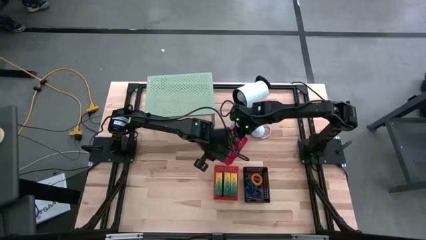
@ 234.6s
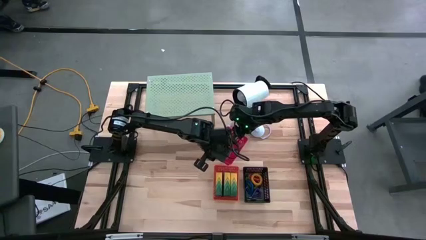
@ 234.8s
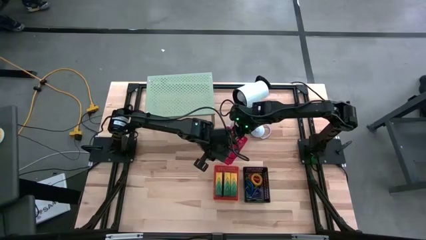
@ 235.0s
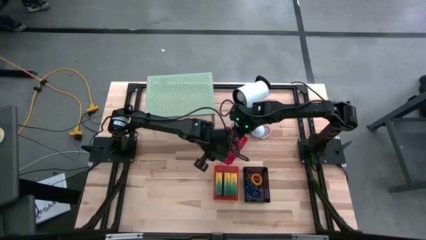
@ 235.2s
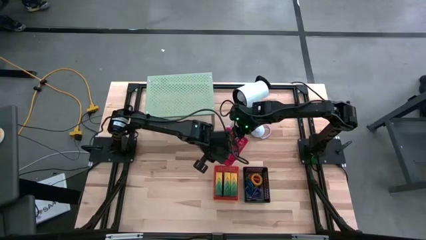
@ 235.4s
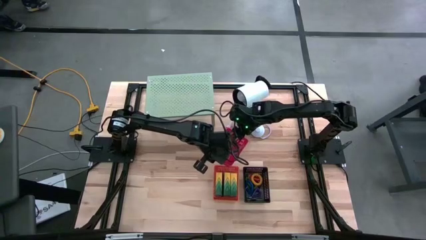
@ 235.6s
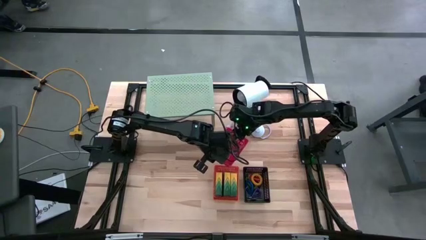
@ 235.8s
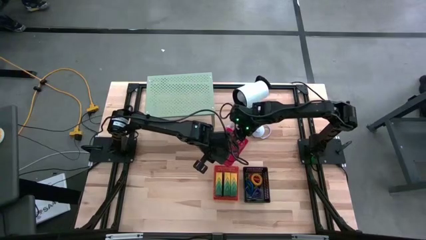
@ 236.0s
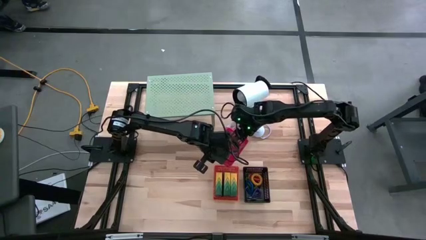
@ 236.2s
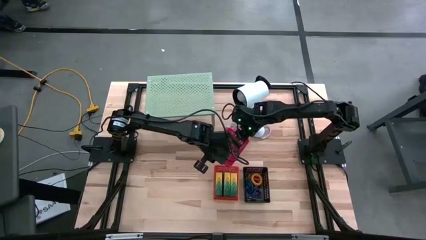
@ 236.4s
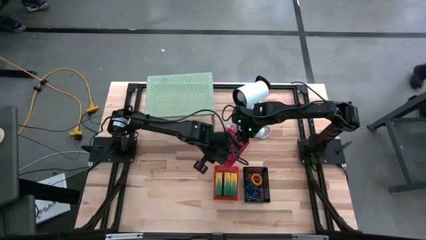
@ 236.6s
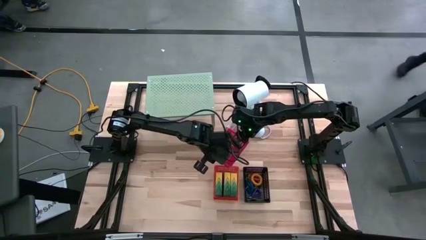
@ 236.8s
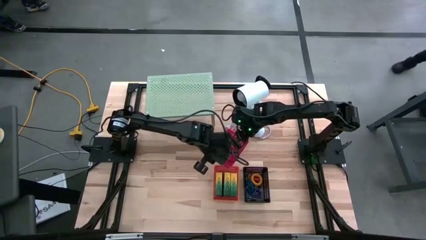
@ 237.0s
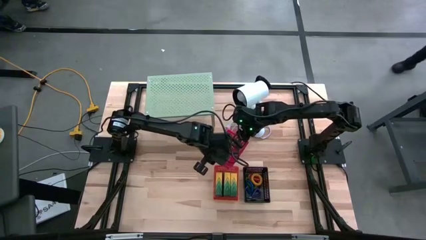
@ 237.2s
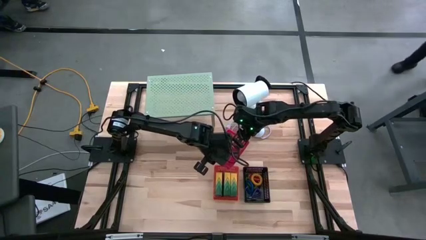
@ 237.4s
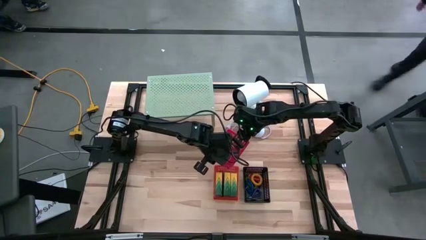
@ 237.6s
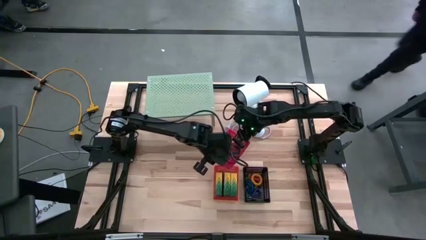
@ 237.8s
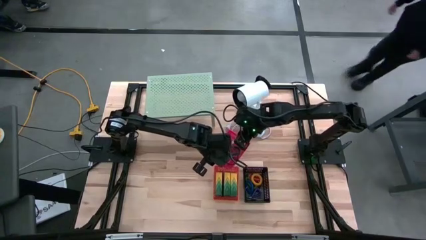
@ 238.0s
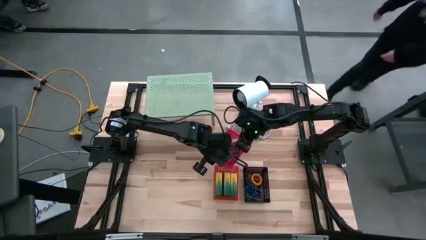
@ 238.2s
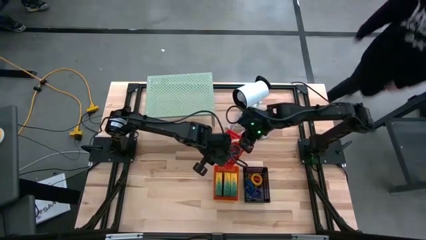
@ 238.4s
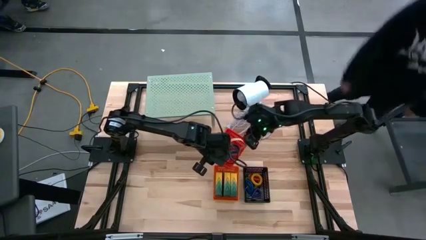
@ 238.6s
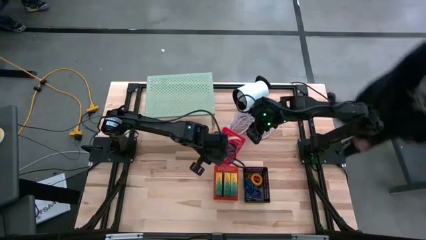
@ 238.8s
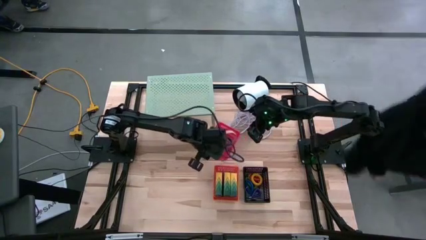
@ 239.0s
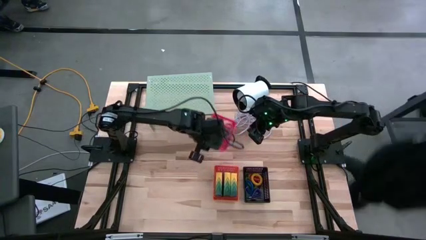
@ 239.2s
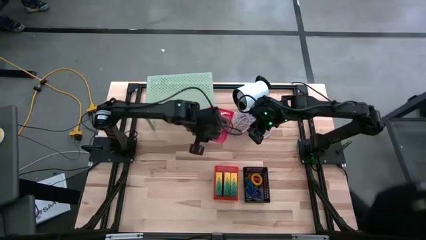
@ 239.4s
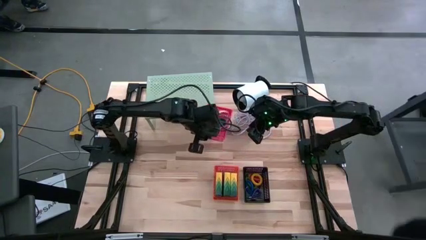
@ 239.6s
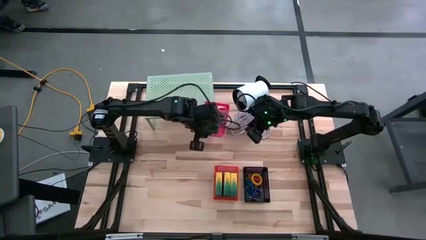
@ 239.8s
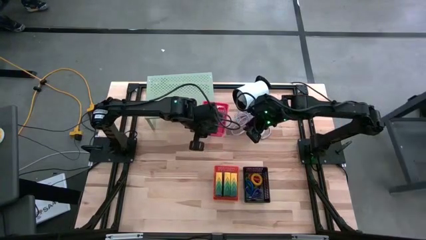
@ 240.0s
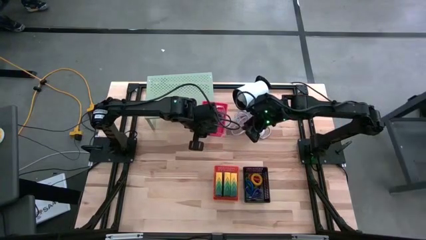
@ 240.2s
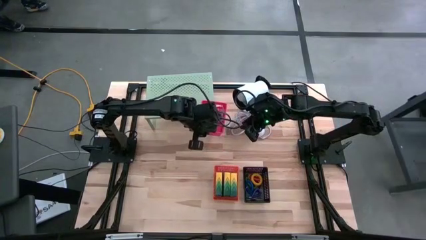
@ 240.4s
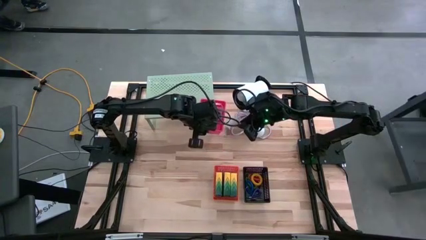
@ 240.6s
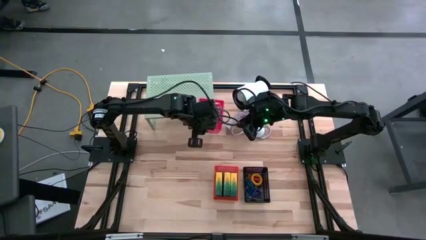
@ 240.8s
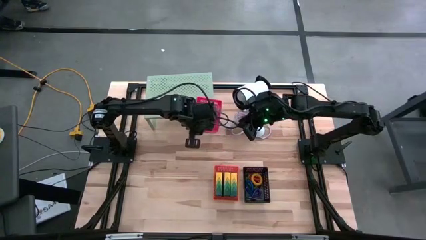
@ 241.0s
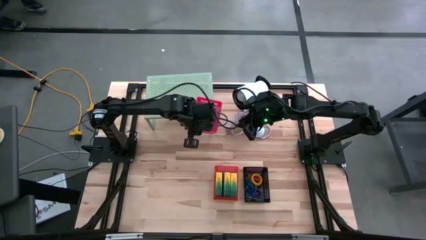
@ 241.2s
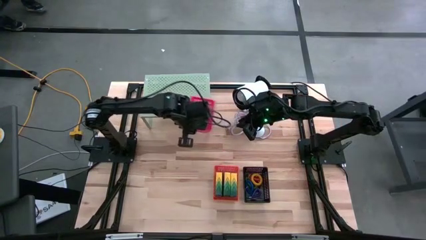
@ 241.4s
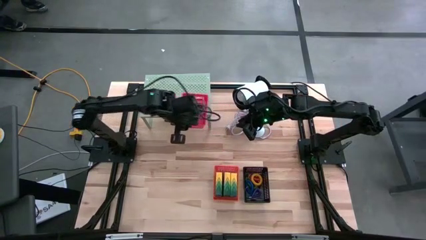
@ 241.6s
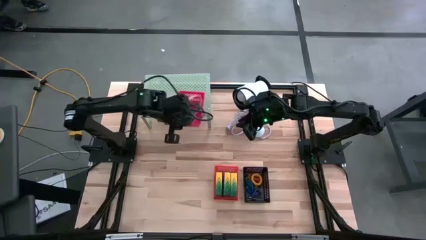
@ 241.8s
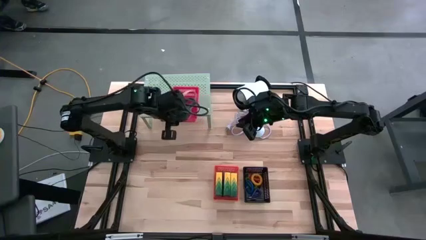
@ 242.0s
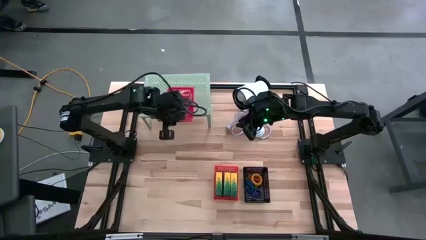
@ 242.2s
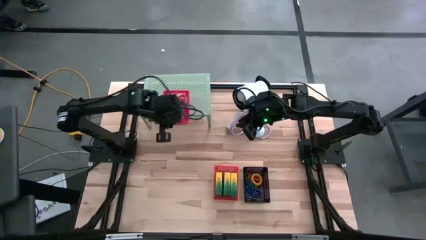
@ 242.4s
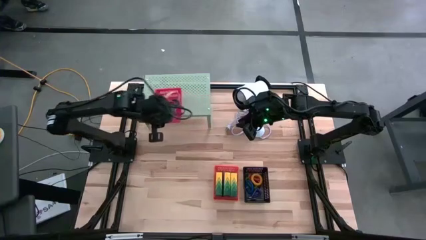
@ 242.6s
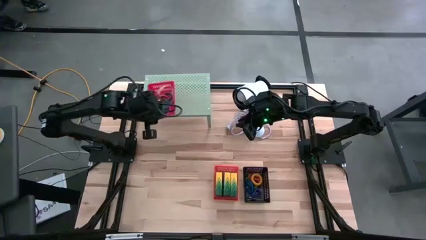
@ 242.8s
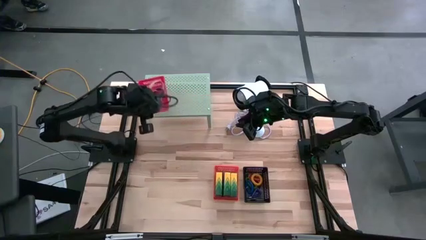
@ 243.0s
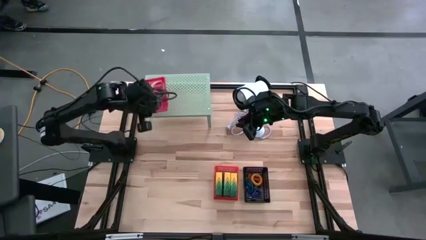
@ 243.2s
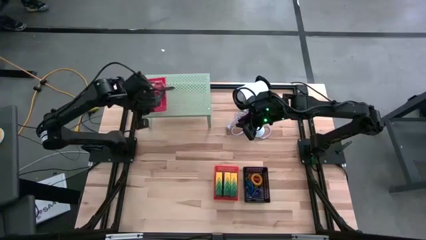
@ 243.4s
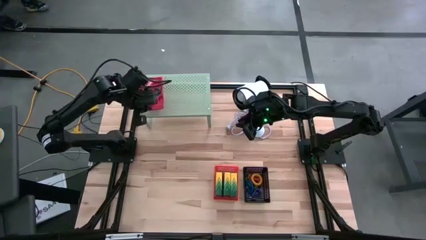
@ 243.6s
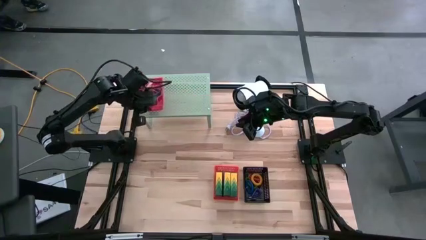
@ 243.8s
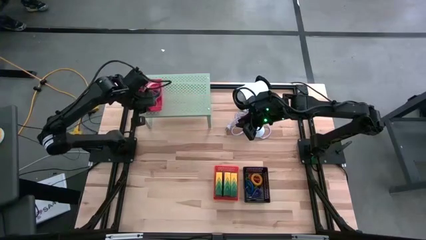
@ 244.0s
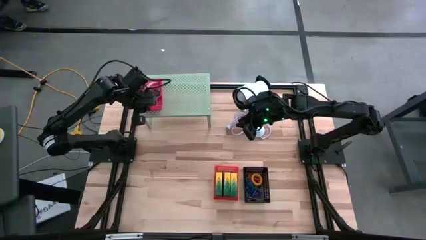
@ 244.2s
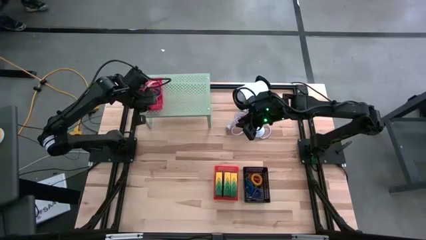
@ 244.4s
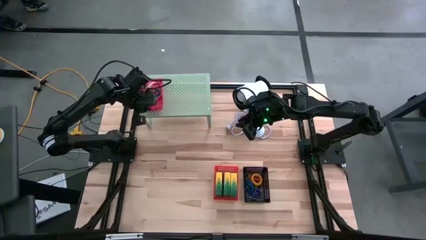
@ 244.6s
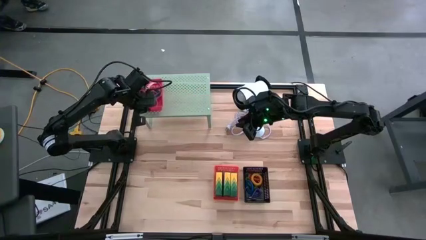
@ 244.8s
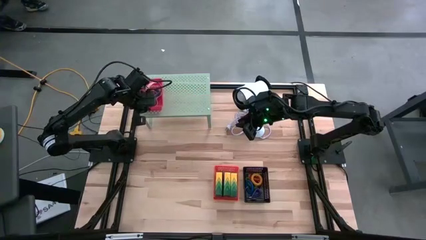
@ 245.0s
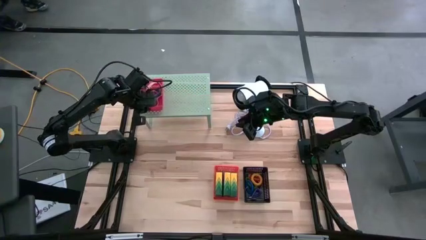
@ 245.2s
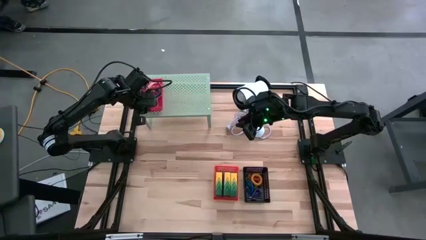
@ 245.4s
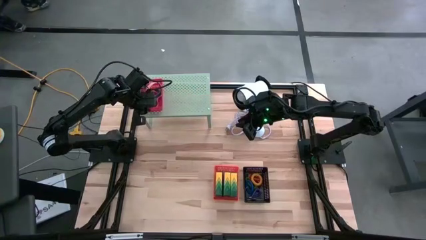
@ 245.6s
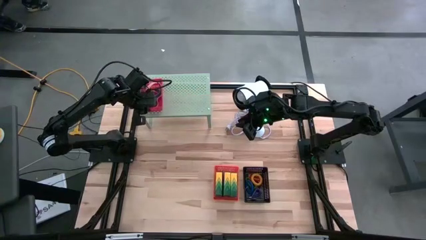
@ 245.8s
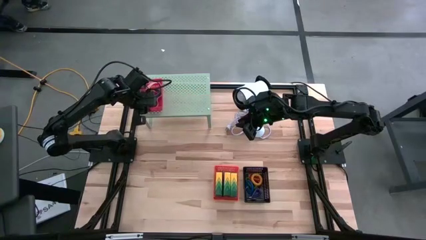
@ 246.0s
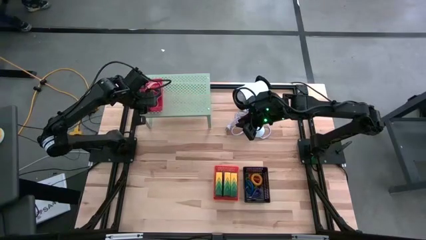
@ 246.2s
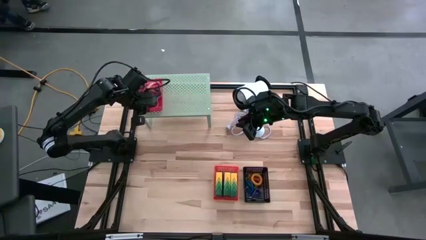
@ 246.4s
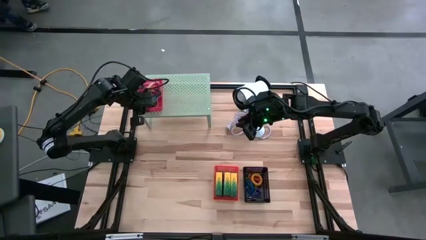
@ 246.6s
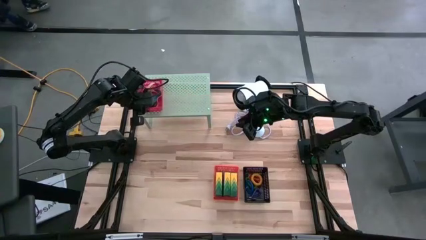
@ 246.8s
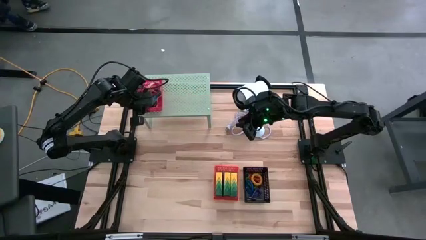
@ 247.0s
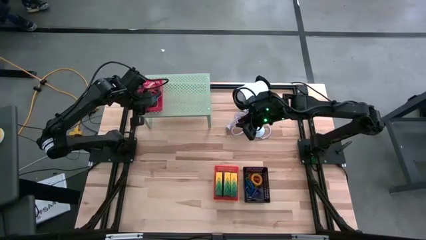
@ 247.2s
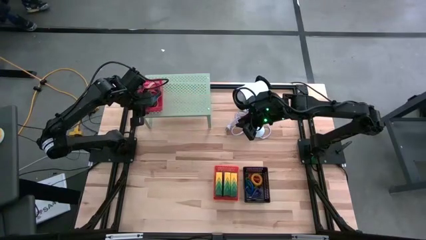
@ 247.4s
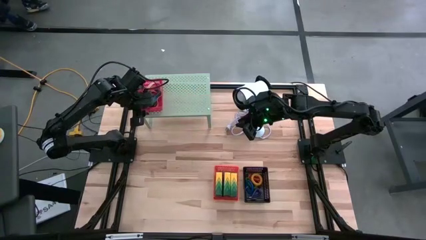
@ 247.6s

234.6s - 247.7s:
Task: Pick & Place Office Desk Supplies
Put the red basket on the shelf

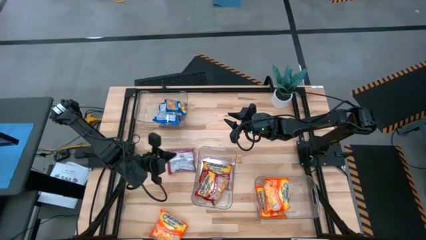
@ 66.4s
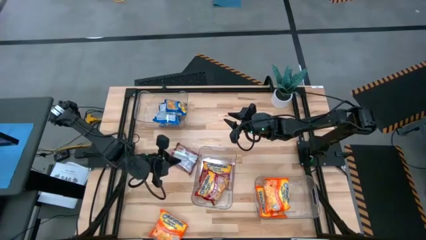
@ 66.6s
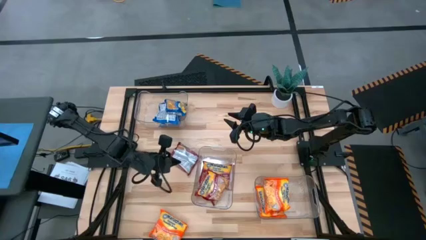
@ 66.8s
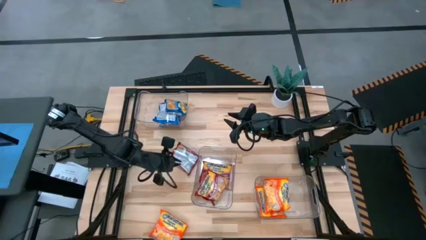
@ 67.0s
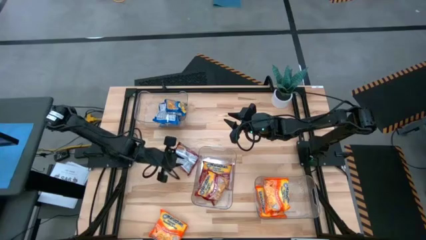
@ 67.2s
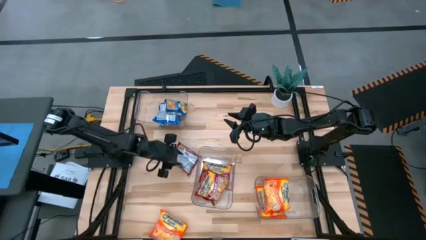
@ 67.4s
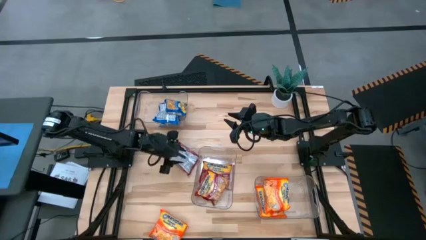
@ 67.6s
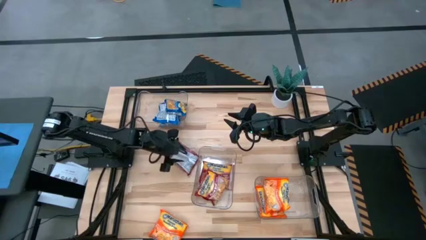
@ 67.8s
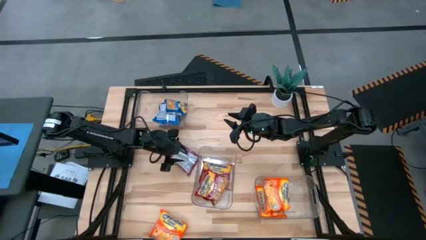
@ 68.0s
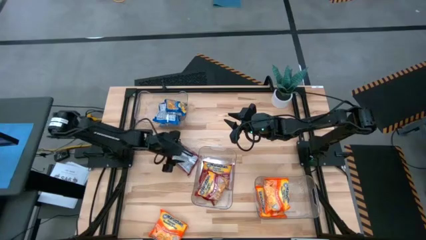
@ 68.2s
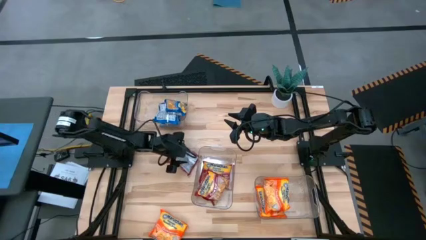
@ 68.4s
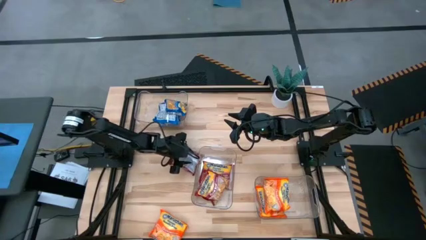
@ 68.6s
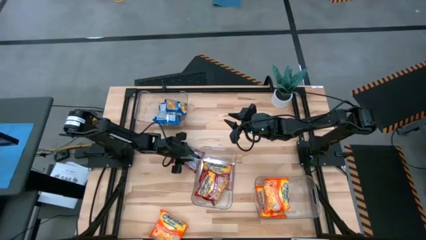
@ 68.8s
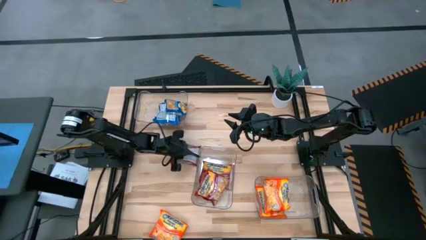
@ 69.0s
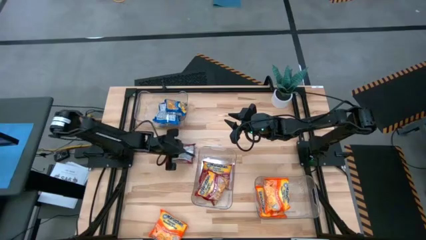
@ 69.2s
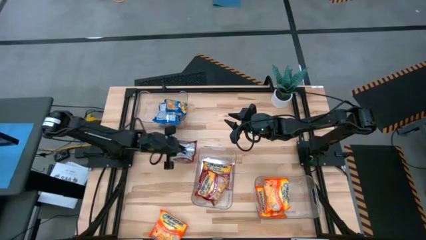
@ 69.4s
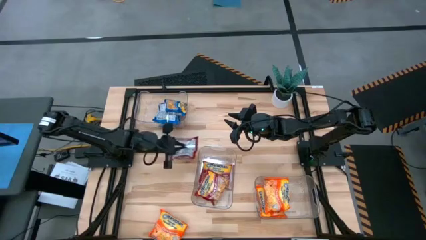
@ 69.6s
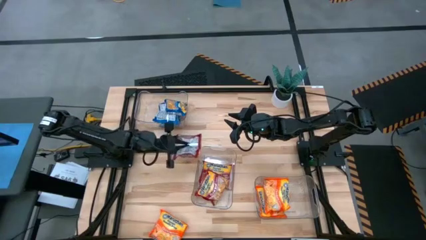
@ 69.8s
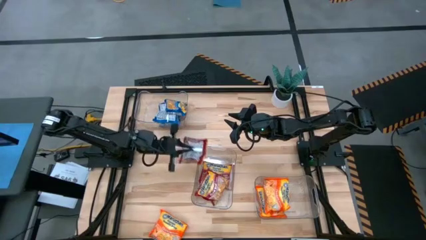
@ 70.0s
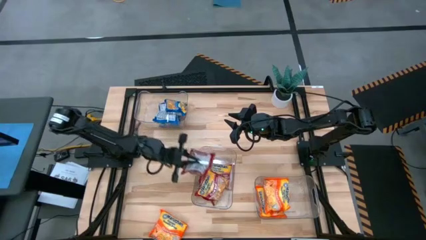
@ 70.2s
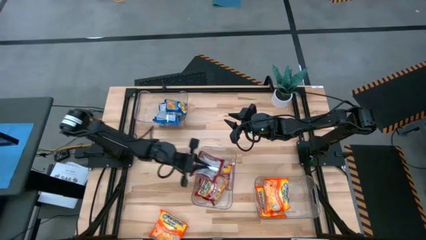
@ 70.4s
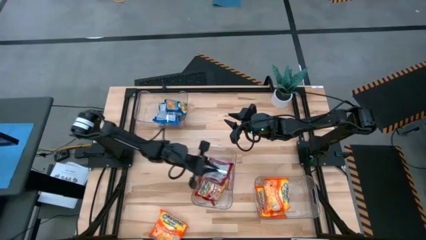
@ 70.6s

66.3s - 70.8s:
Task: Sort Maruchan noodles
Put the red noodle pack into the middle transparent bin
